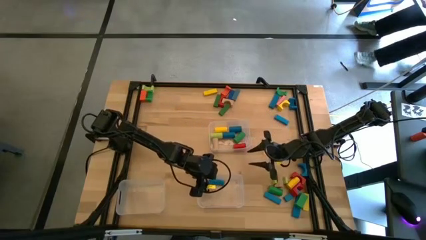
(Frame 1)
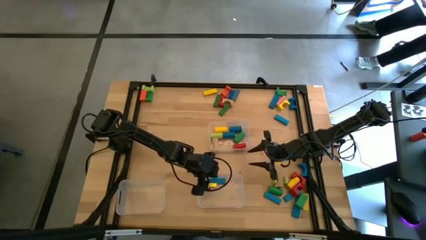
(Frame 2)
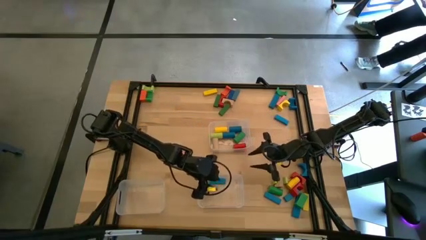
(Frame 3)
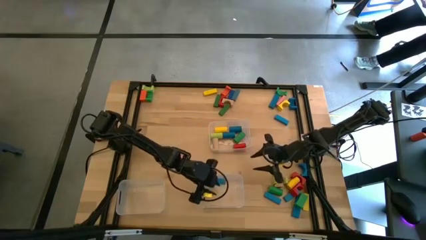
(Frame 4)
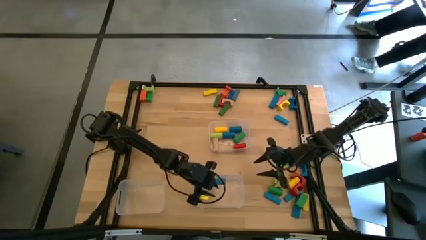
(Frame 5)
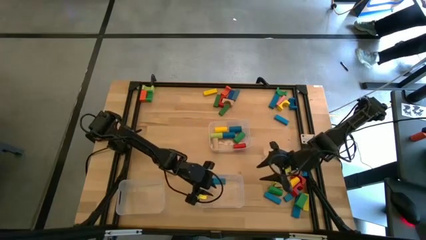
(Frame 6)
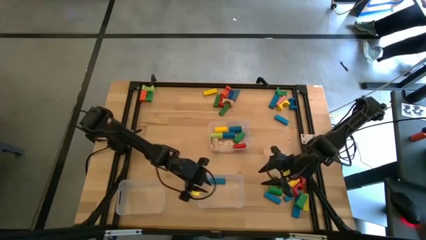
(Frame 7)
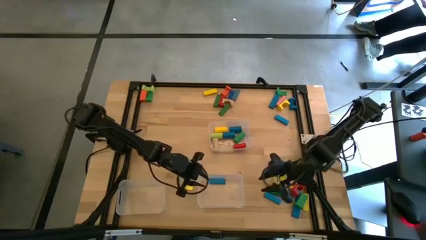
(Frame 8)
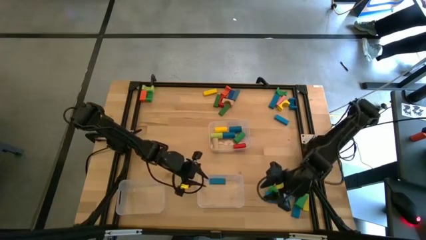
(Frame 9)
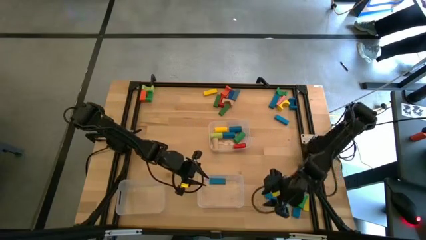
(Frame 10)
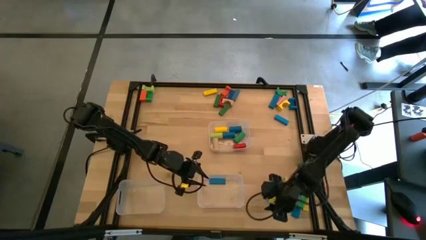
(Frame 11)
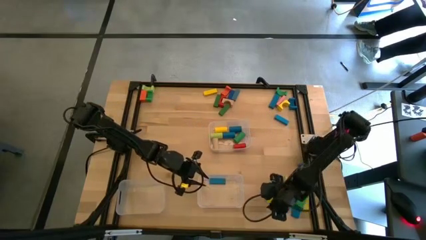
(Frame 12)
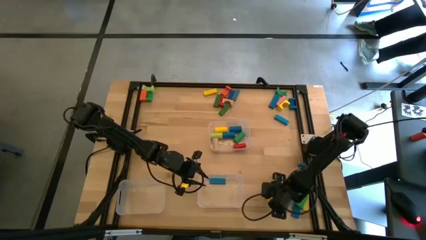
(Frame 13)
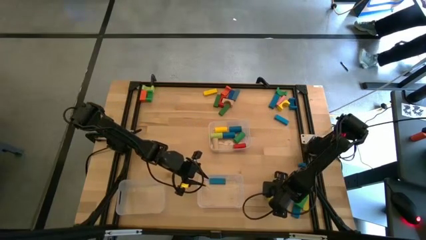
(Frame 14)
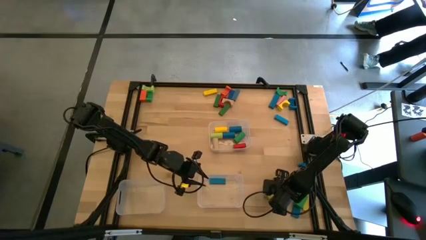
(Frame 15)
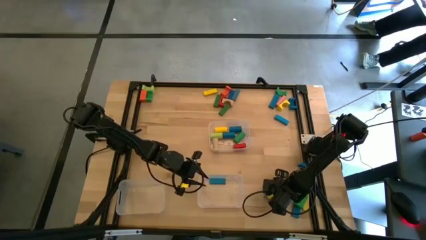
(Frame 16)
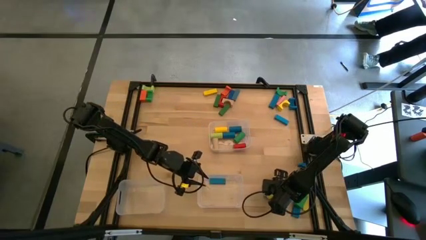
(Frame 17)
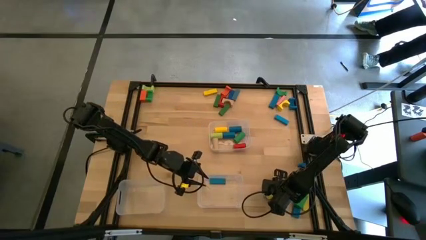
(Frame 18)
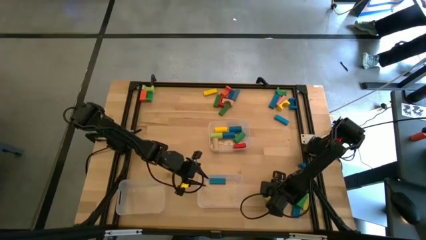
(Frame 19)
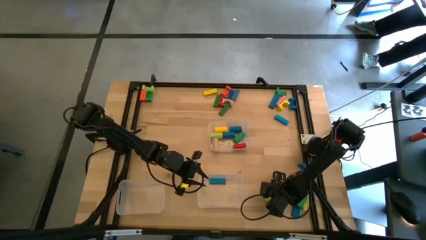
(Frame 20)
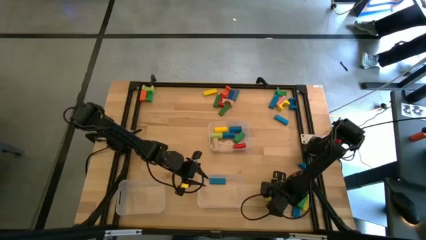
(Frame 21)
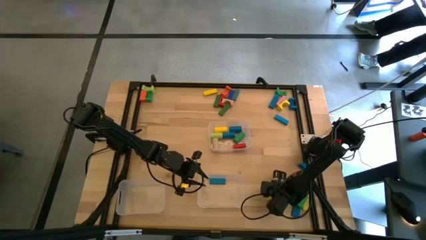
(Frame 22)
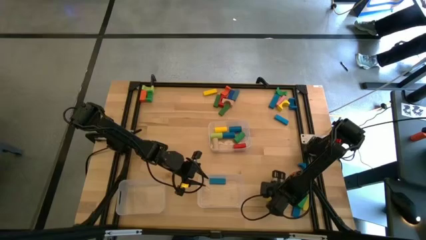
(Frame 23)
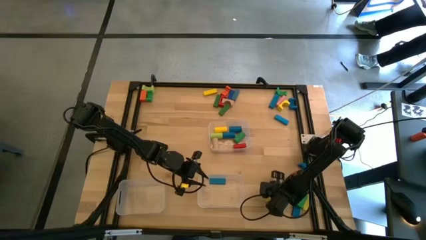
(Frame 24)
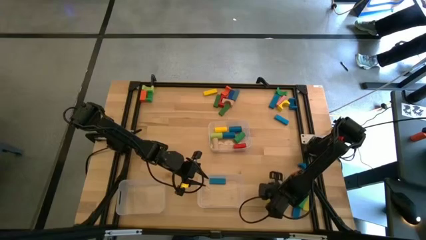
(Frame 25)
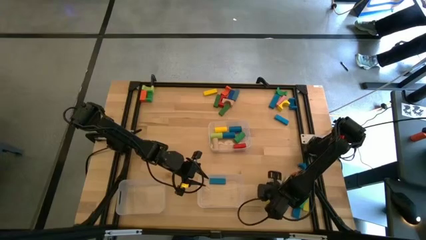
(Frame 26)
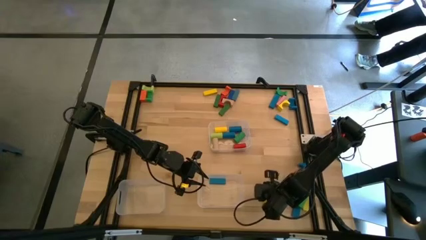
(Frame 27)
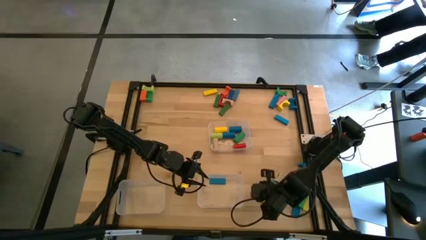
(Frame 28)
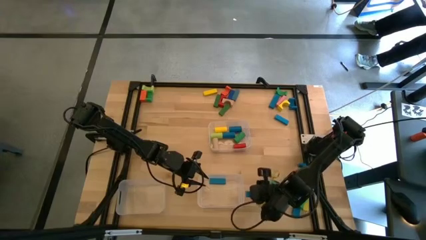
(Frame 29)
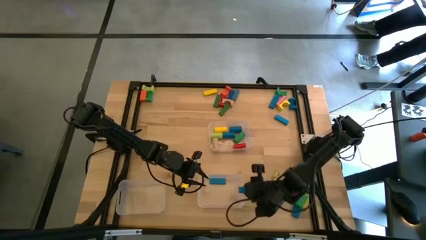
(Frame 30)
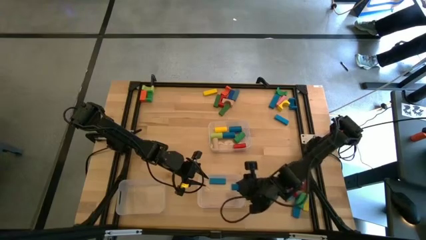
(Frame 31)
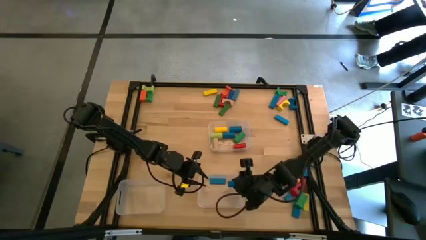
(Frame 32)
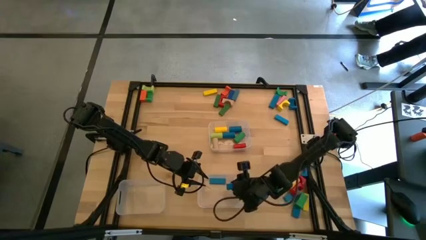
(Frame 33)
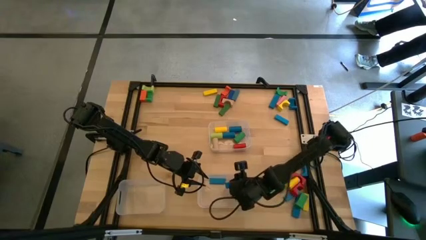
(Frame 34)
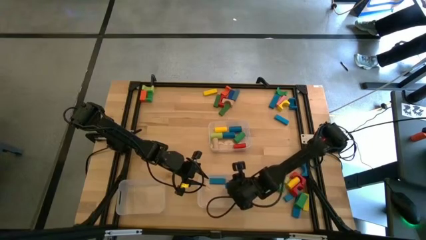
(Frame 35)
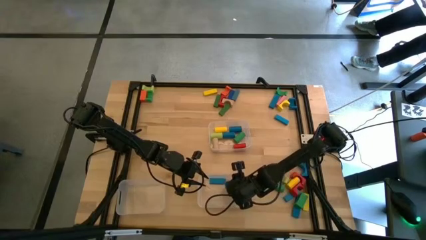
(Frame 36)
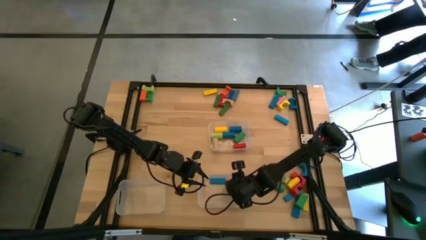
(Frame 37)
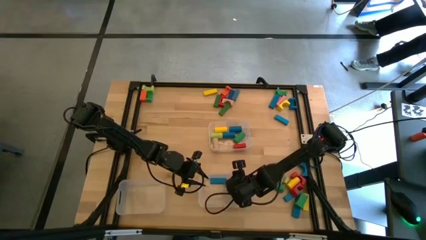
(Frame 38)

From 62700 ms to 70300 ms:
Task: Sort blocks by size
Put the blue rectangular block into the bottom right transparent bin

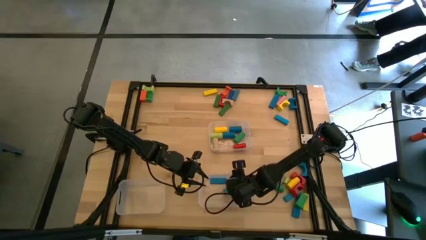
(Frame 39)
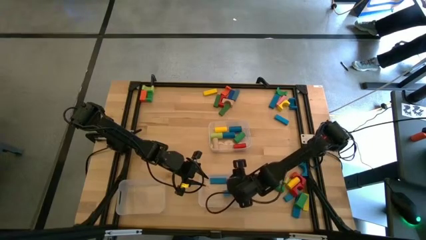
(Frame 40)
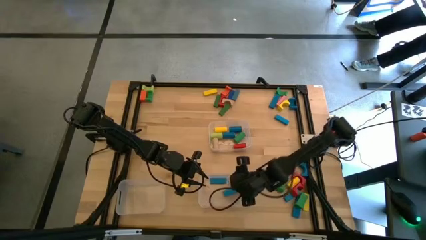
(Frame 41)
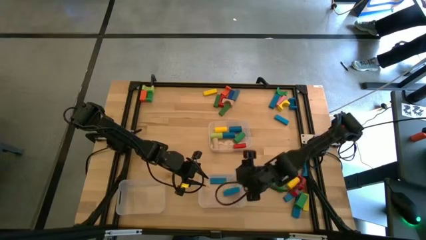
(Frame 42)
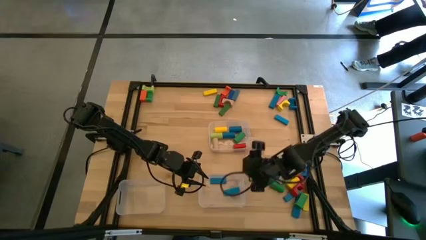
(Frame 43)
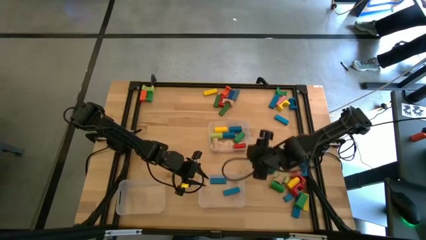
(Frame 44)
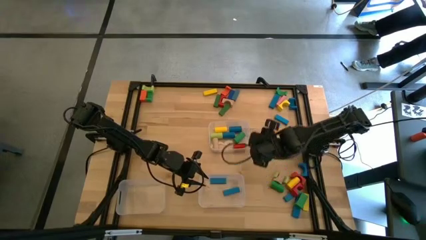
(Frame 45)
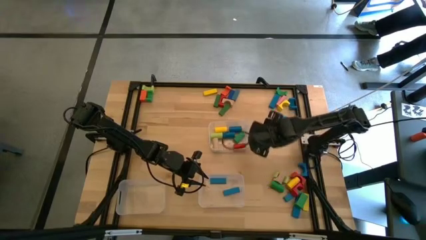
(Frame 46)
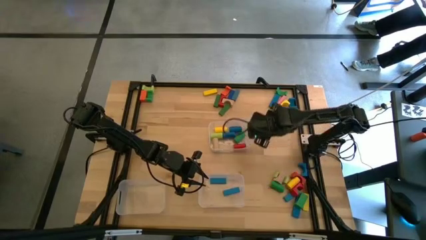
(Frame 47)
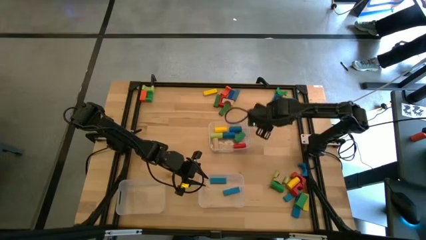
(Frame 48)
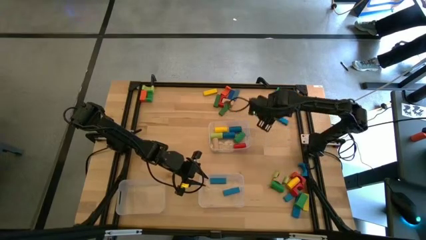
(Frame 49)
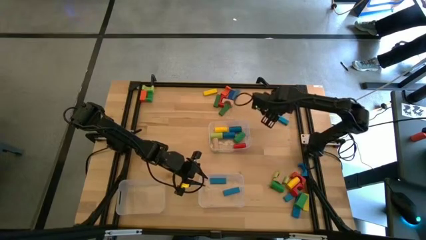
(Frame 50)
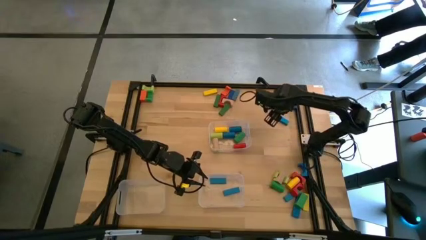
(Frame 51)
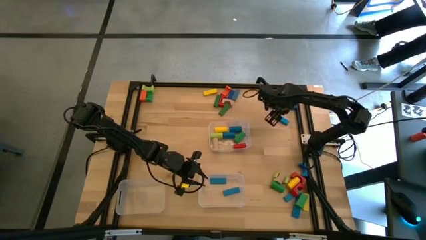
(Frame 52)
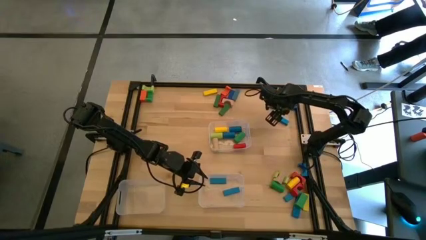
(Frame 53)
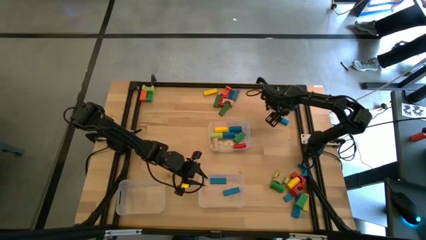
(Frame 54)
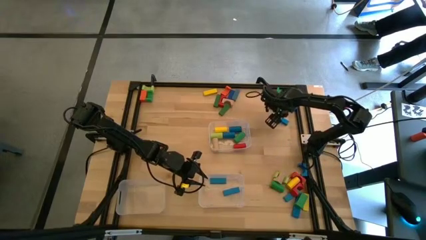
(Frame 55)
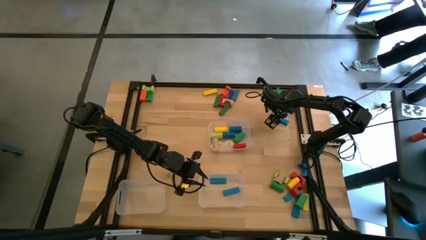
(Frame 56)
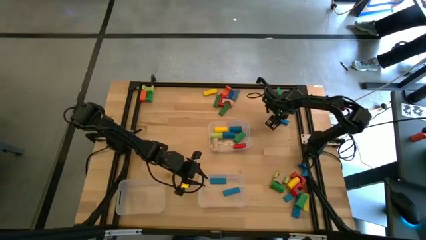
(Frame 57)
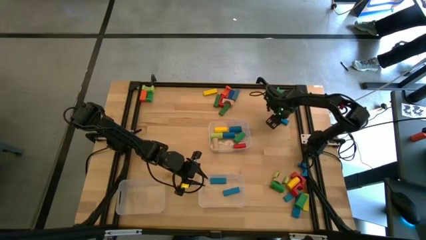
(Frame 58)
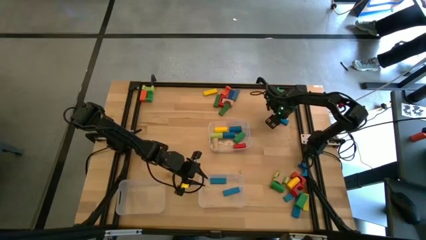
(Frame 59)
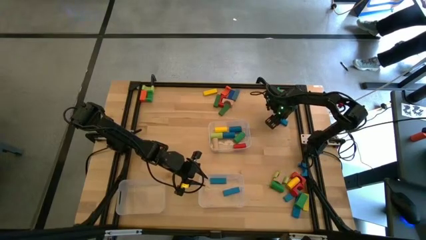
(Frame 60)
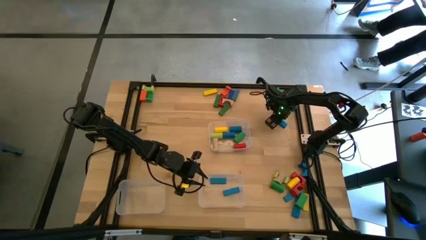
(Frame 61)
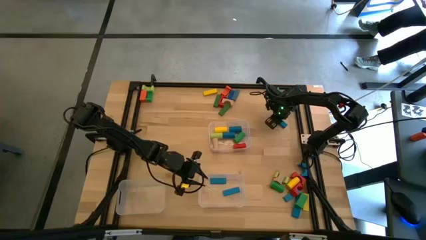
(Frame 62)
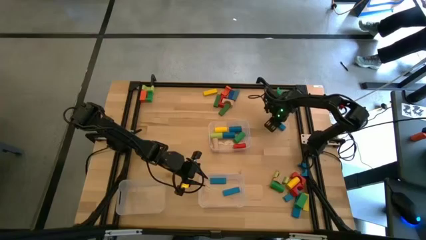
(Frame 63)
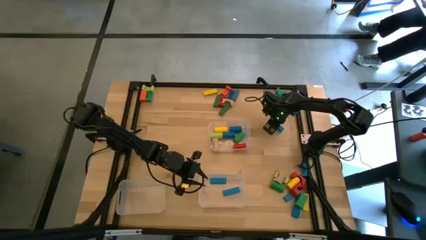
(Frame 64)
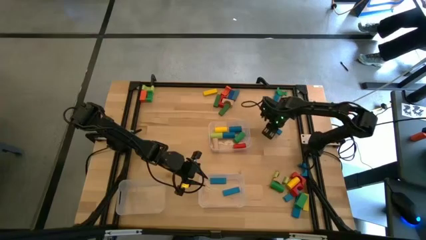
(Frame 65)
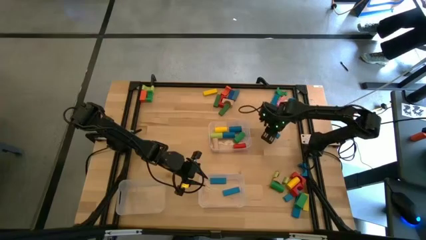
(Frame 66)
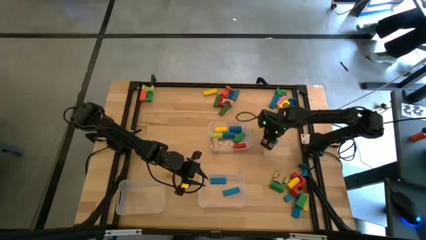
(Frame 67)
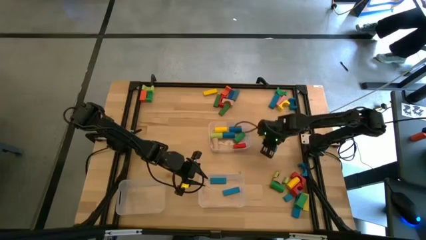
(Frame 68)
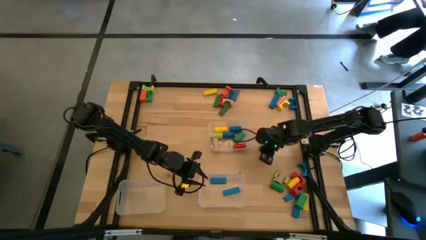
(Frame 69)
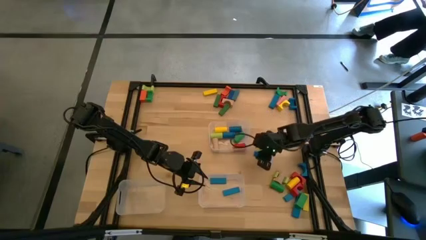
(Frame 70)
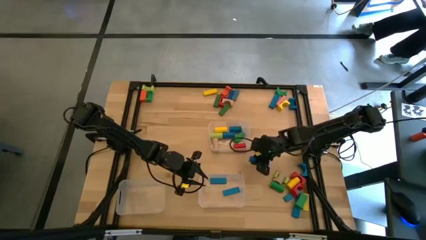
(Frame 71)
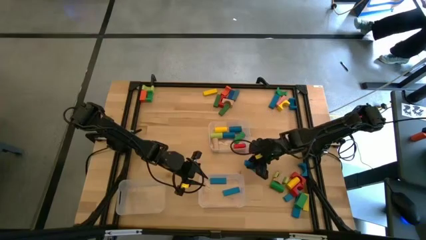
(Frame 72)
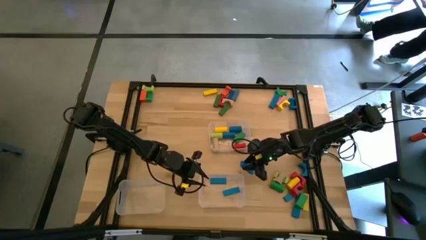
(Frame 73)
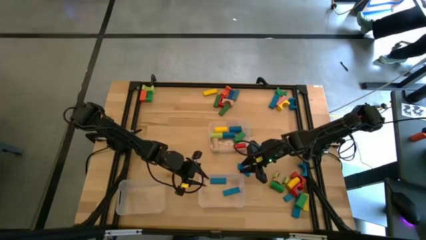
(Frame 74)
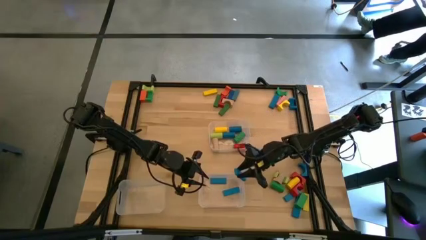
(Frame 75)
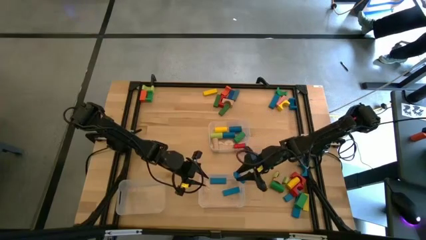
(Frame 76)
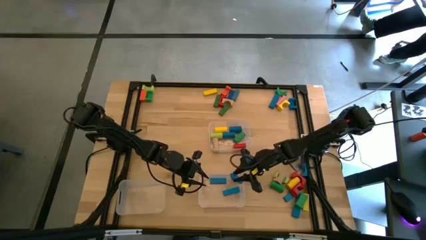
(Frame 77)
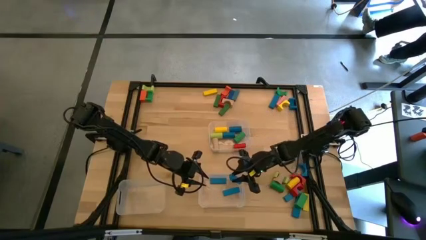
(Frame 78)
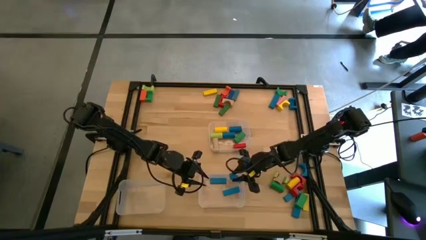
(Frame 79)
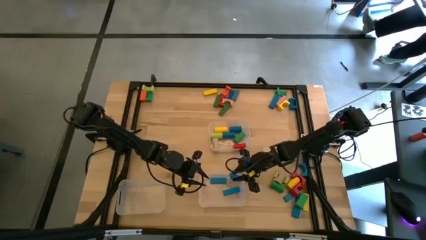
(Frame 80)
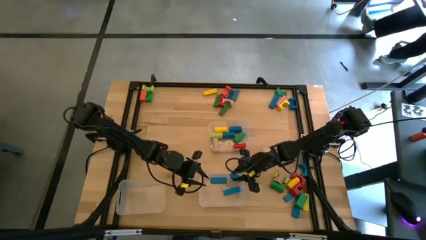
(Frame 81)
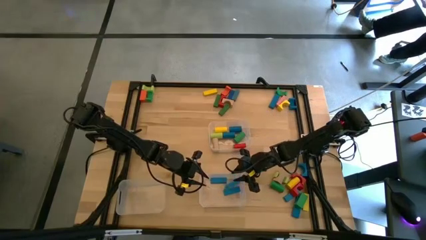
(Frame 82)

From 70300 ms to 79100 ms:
Put the blue rectangular block into the bottom right transparent bin
